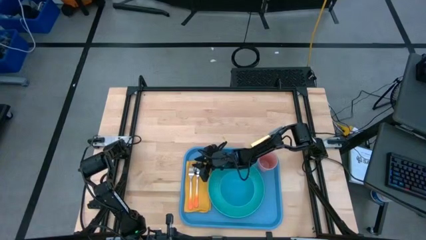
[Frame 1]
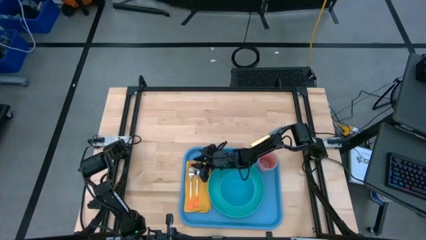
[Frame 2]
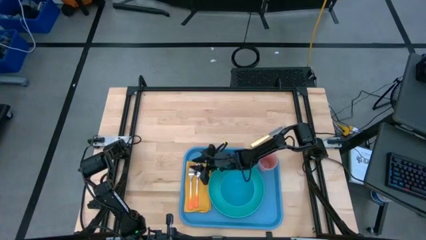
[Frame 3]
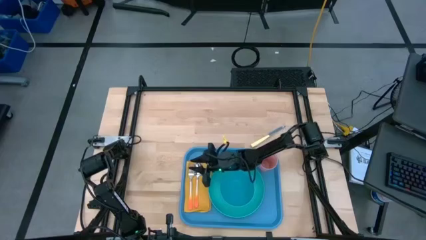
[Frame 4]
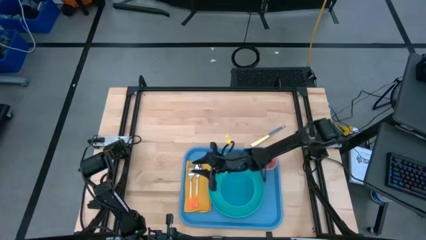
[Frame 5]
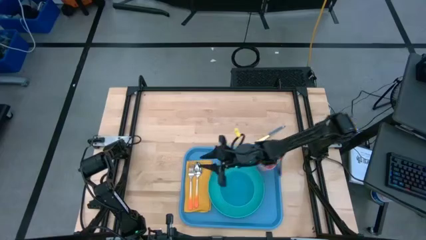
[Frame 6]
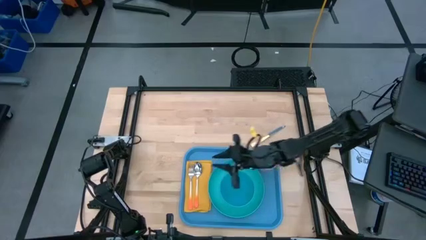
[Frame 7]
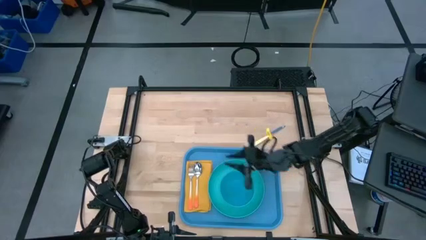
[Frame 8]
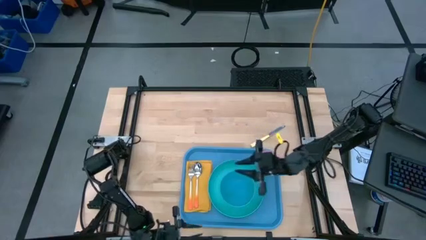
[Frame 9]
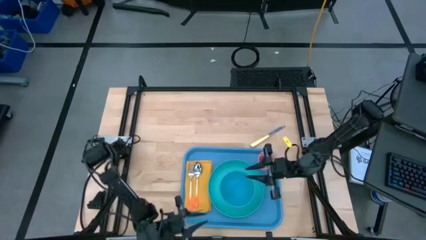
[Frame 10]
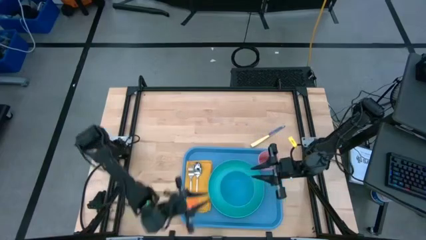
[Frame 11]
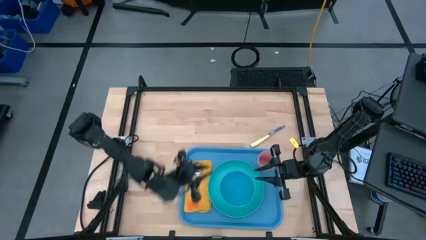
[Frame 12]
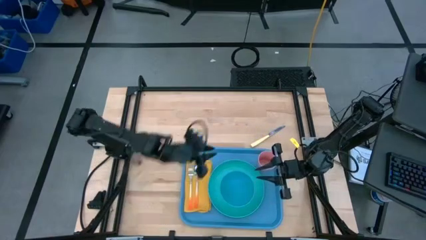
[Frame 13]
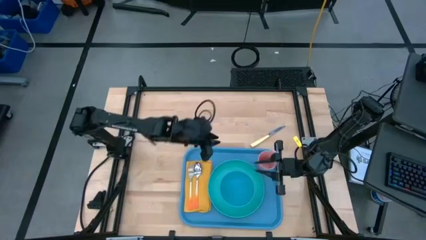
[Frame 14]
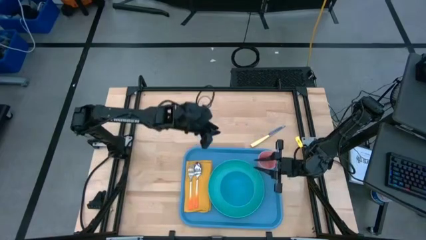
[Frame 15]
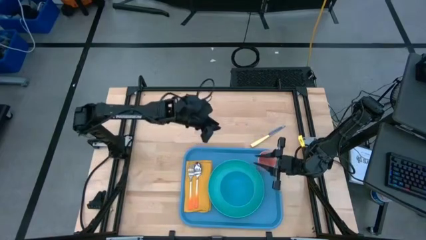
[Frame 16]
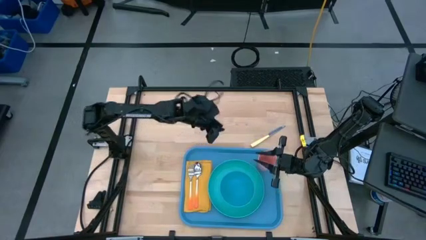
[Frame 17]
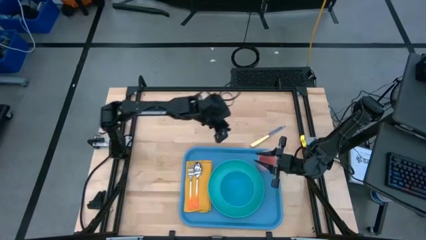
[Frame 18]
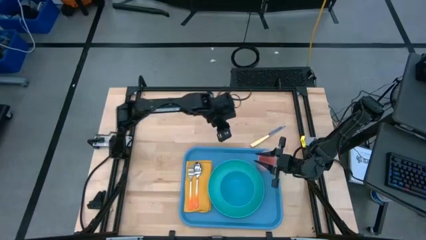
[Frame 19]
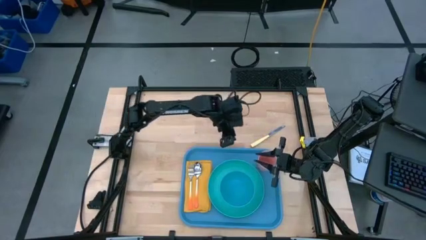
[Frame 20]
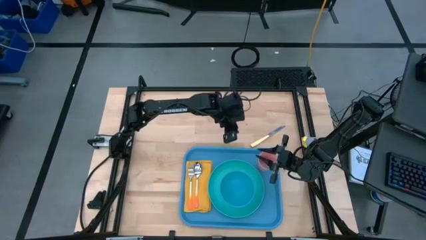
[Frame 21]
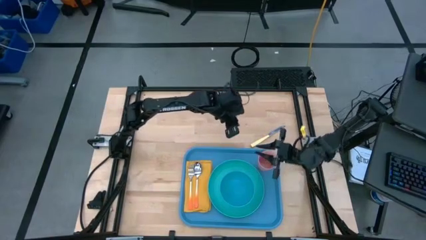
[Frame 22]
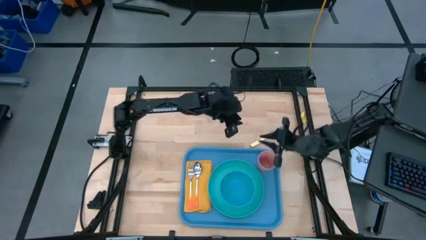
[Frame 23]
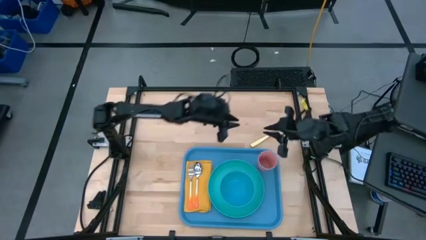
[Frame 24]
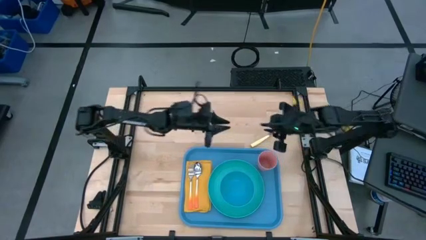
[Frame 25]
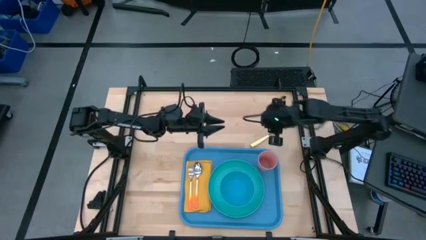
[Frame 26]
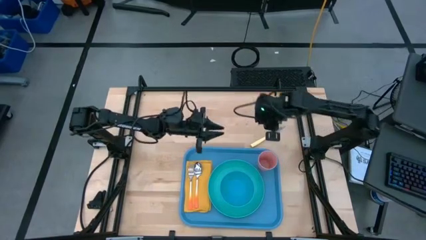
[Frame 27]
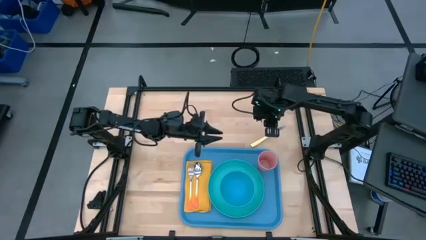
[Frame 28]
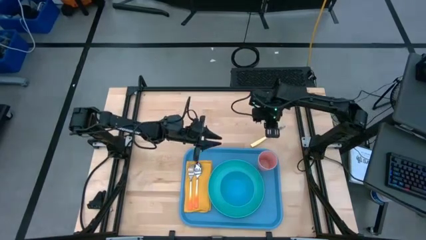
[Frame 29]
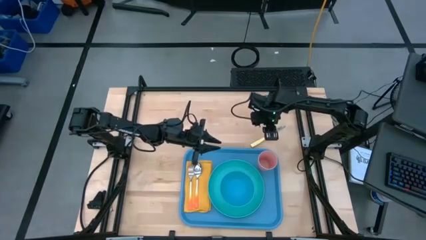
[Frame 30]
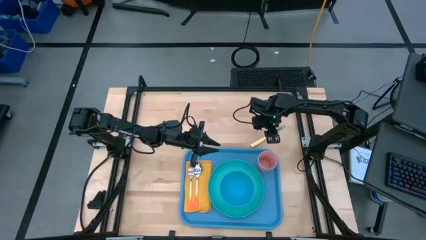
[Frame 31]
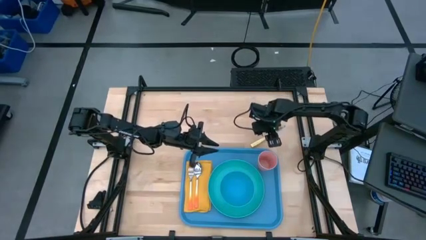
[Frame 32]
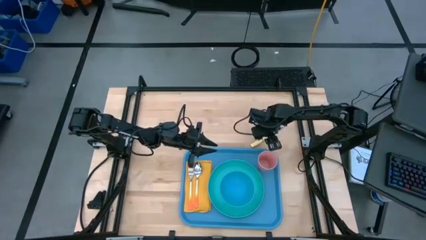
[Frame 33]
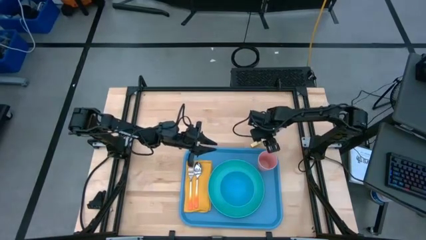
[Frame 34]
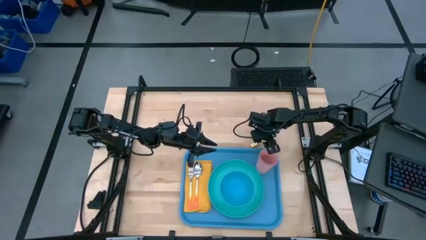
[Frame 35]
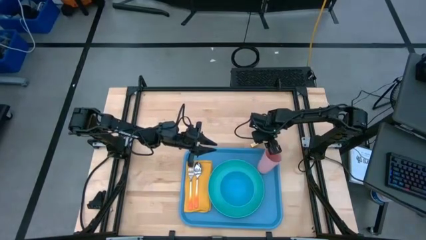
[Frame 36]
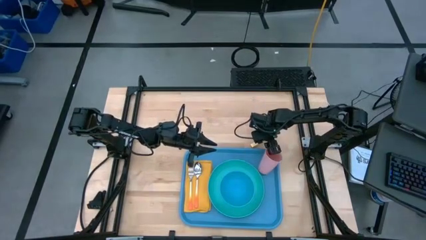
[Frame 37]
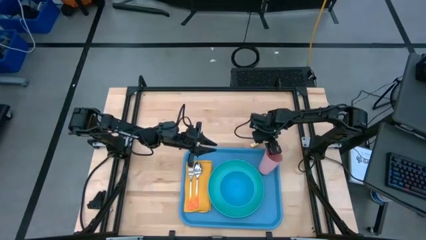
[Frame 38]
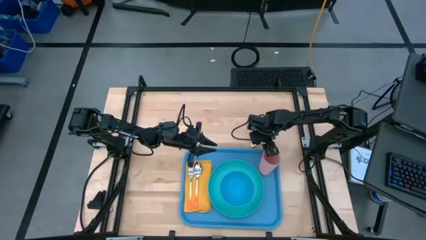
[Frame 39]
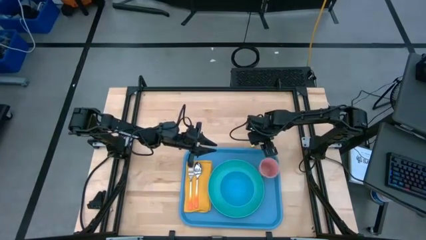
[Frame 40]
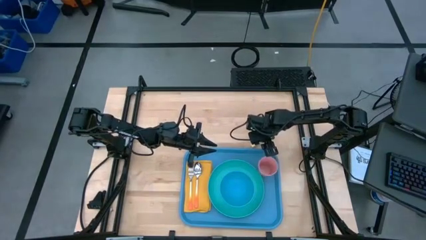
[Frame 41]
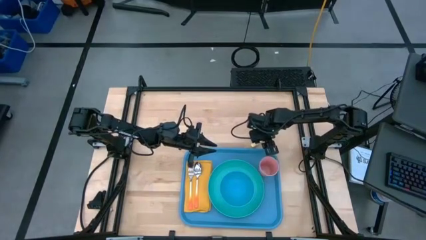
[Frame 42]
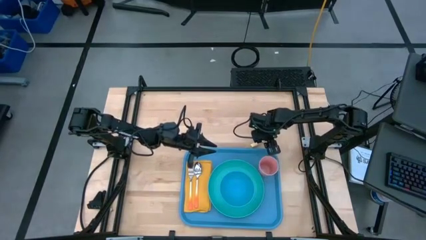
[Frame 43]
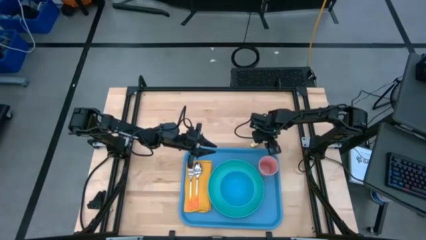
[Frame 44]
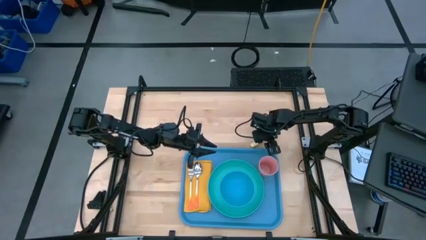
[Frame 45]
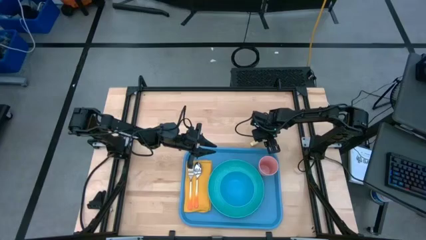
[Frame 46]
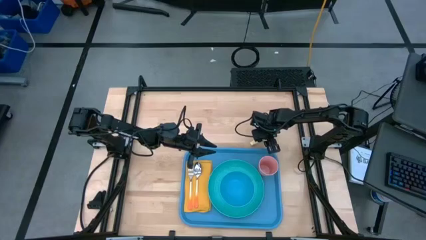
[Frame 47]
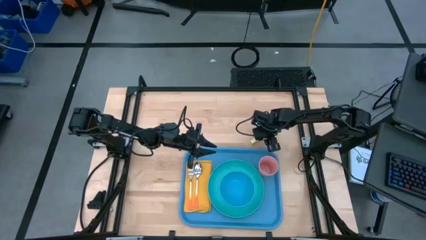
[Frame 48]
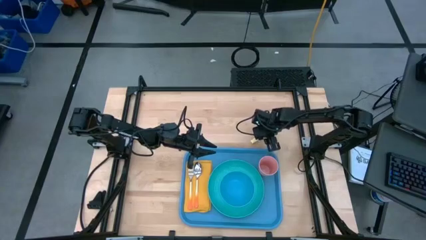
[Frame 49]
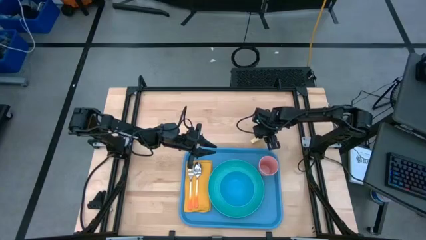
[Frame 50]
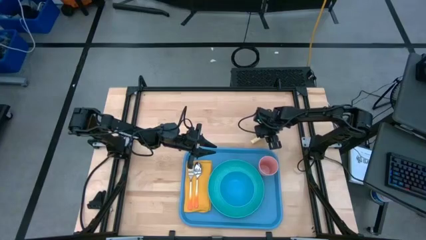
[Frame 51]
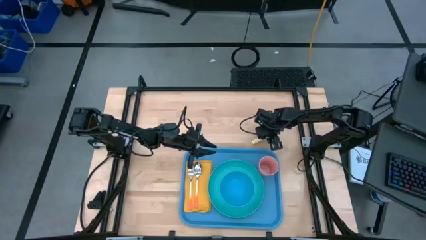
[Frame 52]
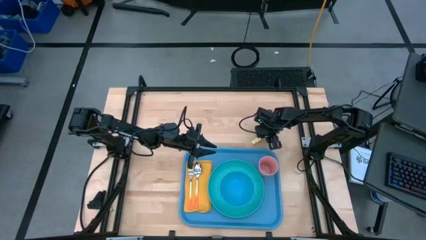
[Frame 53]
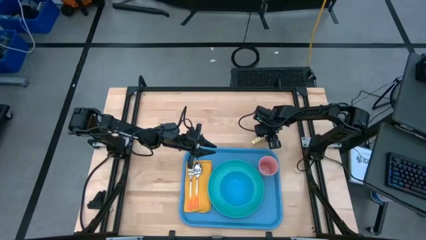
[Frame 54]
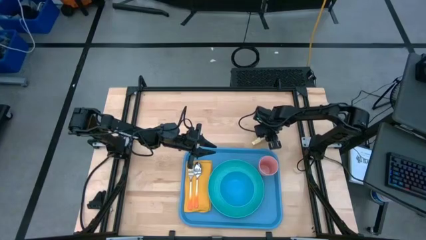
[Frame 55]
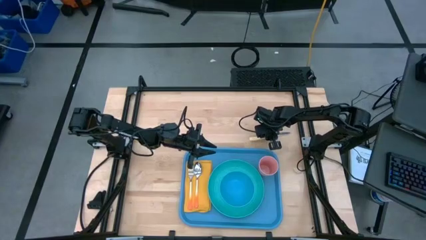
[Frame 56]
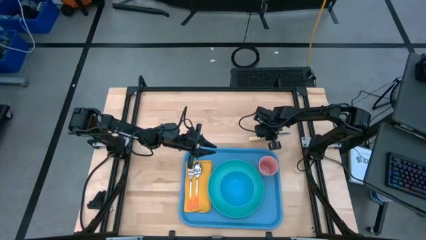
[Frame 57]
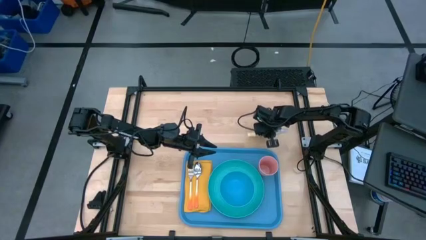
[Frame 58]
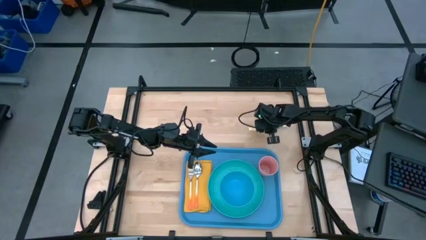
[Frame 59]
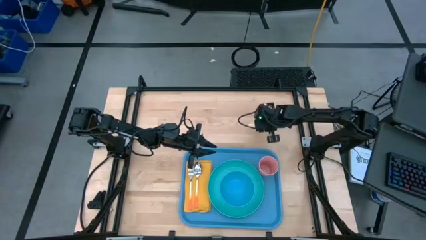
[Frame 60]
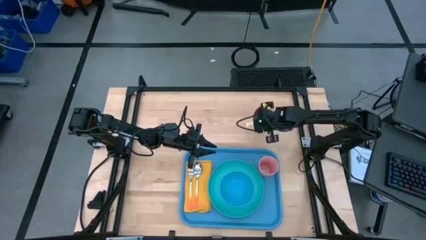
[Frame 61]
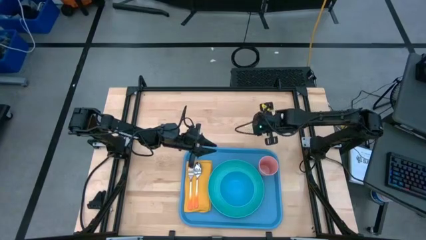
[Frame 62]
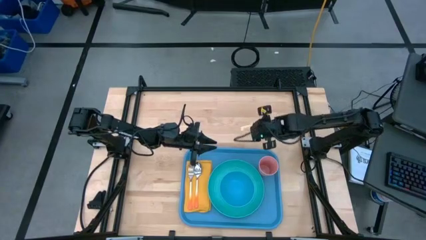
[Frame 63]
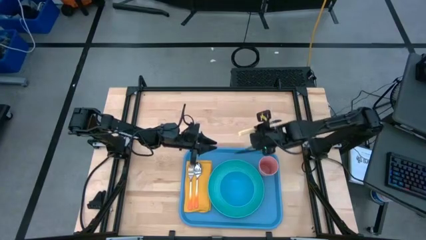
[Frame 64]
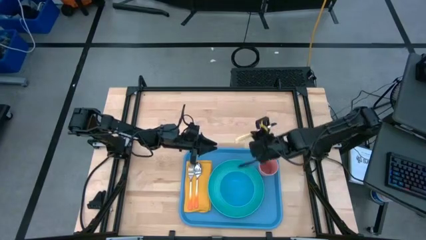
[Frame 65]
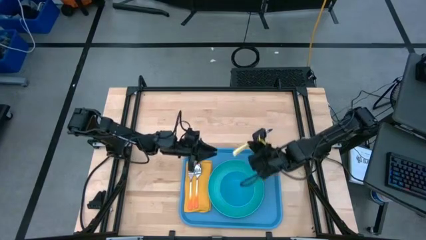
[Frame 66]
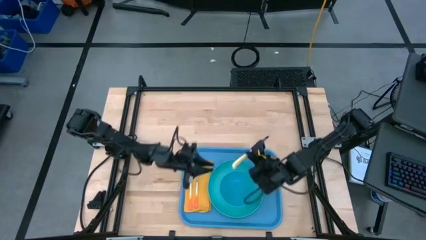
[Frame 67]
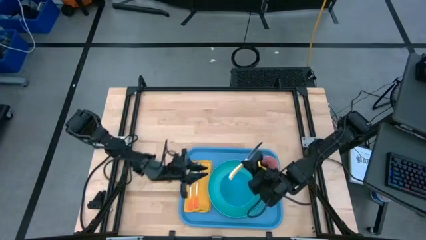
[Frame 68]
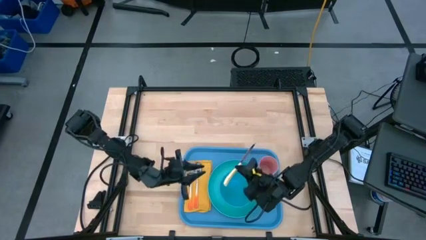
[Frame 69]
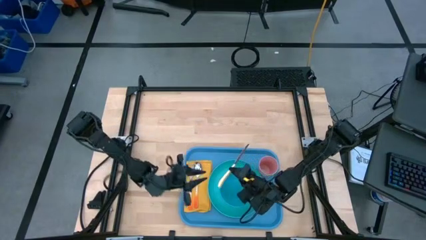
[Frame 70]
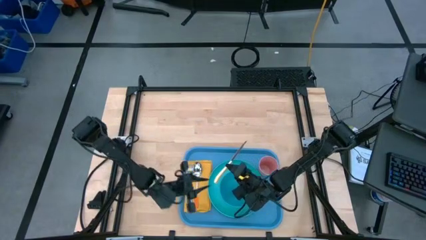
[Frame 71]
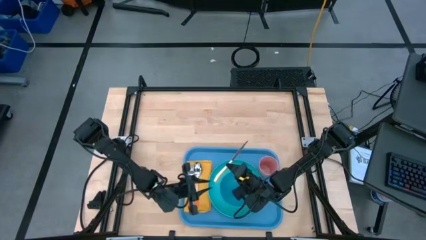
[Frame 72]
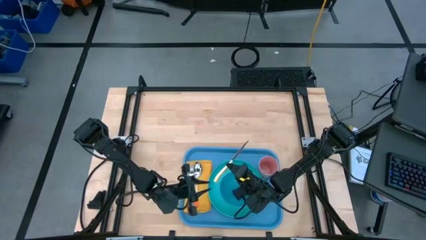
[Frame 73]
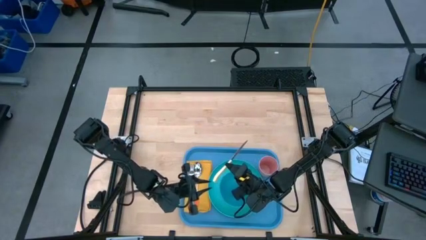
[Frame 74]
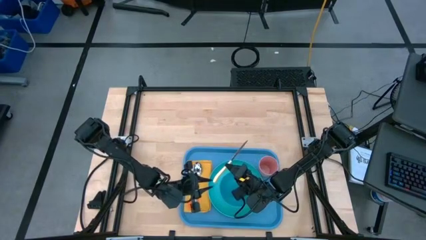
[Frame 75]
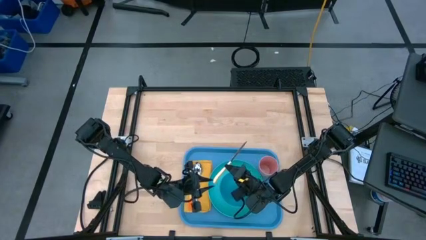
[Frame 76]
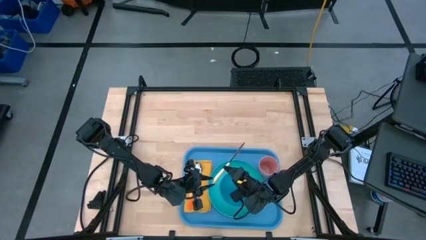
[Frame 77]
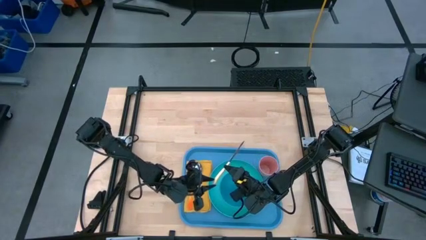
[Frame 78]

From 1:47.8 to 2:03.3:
Task: Set up tray
Put the knife beside the spoon on top of the napkin

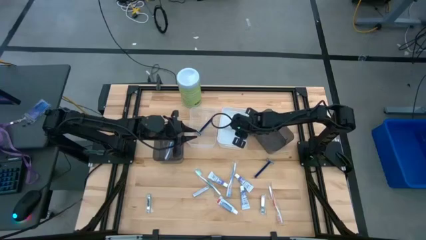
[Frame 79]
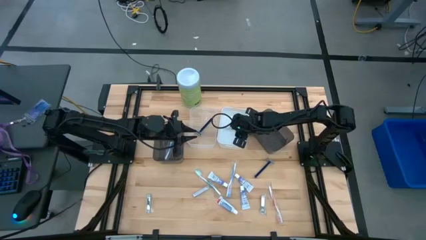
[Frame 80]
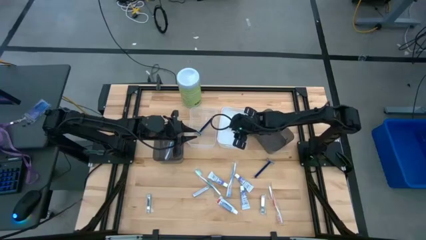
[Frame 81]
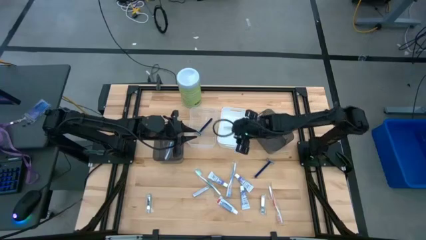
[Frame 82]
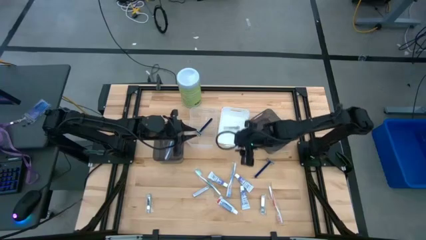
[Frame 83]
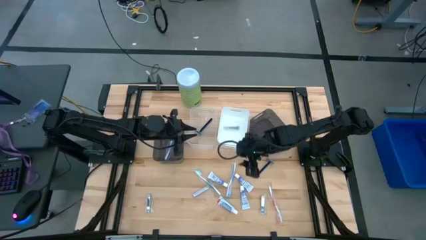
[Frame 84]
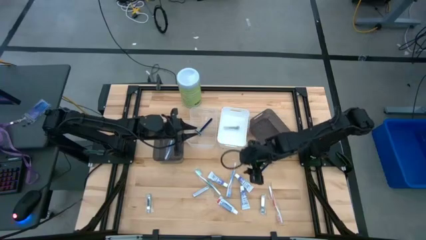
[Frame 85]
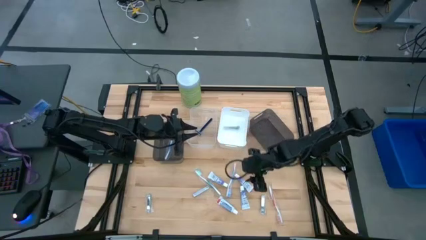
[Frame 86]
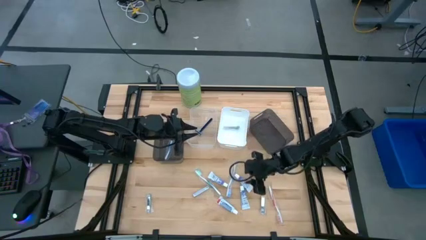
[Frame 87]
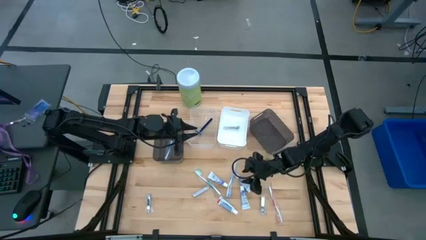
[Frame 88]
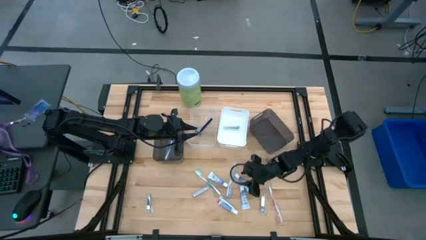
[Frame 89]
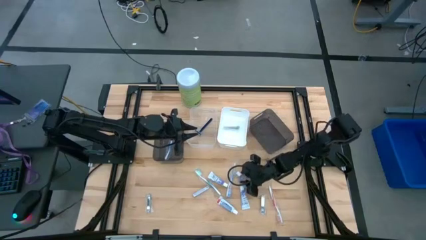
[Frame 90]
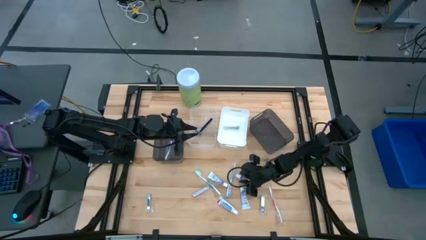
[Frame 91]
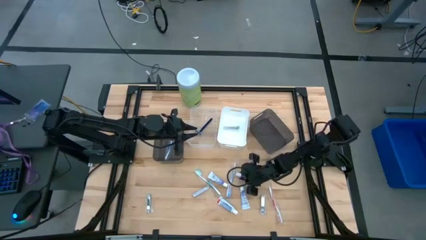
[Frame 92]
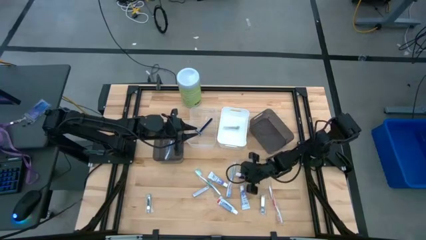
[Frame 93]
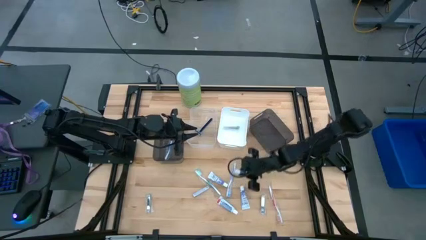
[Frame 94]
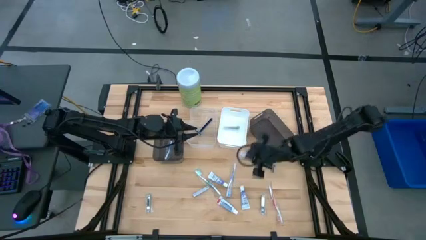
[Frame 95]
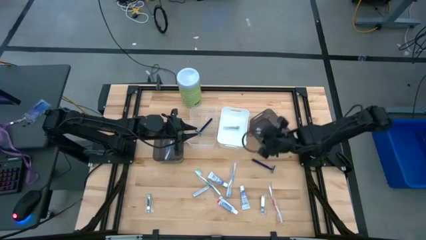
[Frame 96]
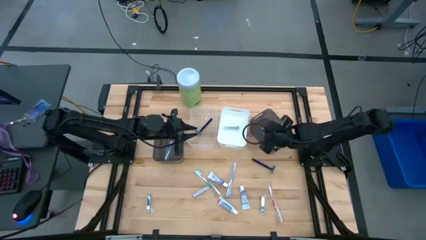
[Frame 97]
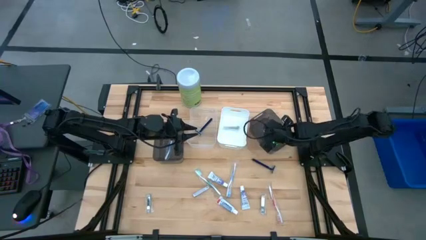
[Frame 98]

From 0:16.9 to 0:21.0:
Task: Pick & Place Travel size toiletries
Put the purple toothpaste into the right black bin
